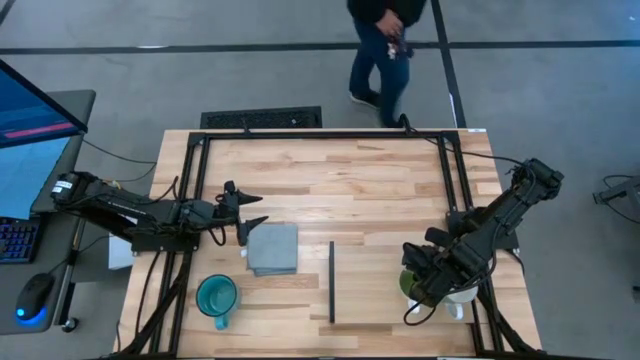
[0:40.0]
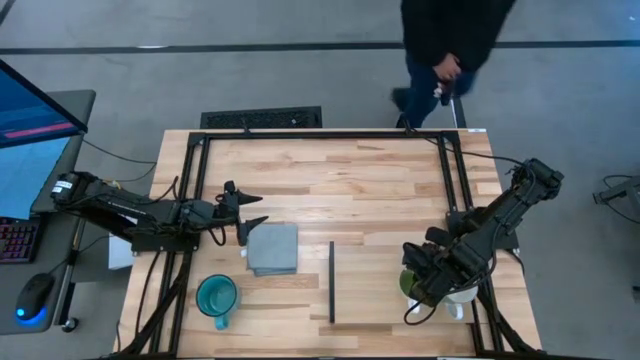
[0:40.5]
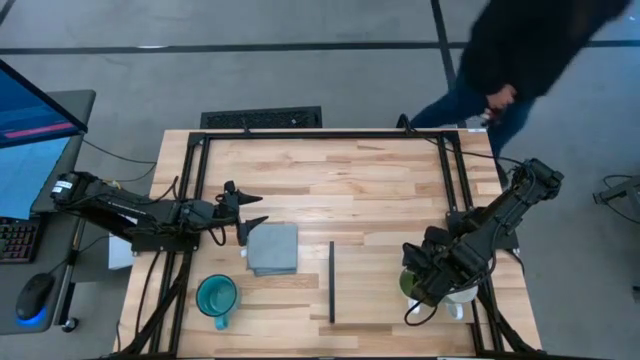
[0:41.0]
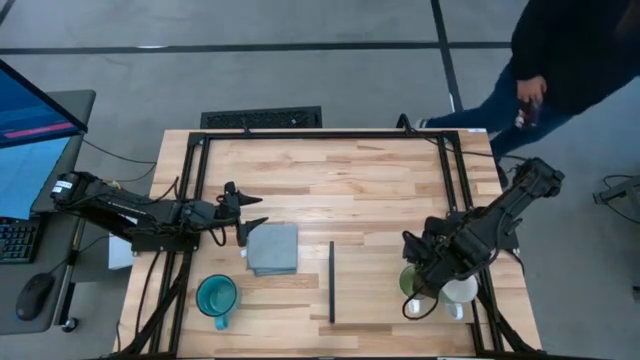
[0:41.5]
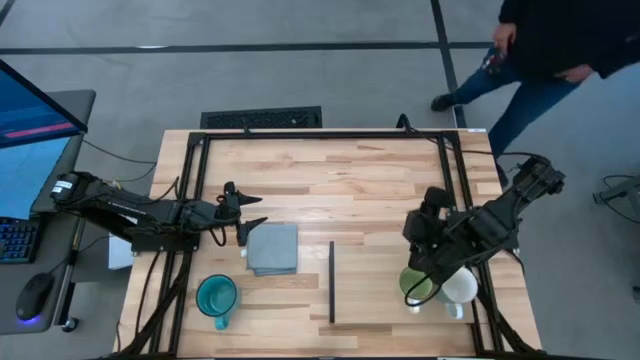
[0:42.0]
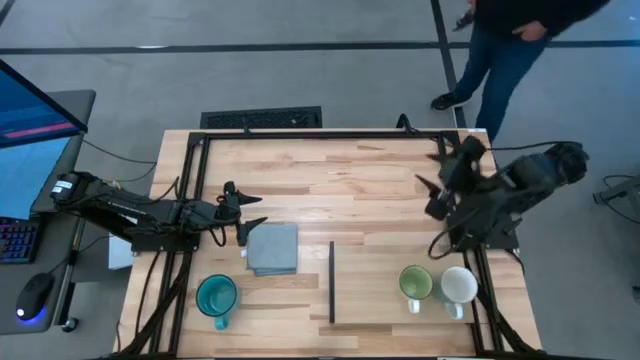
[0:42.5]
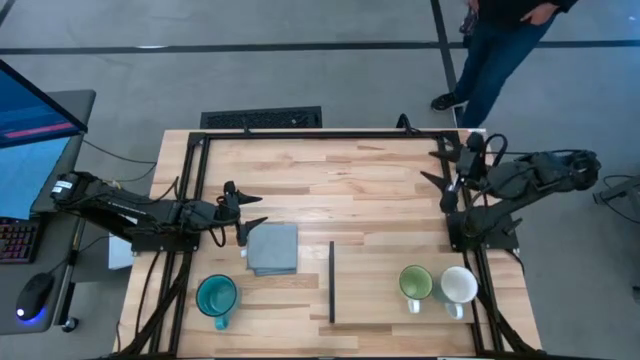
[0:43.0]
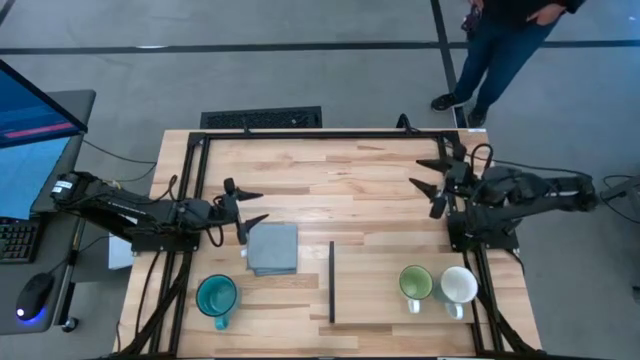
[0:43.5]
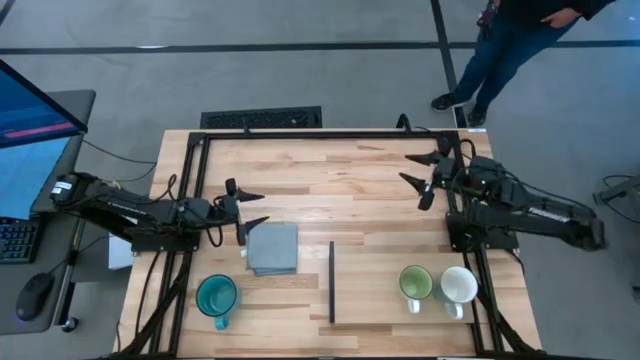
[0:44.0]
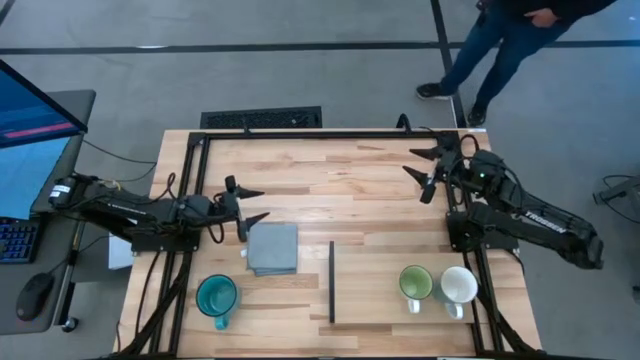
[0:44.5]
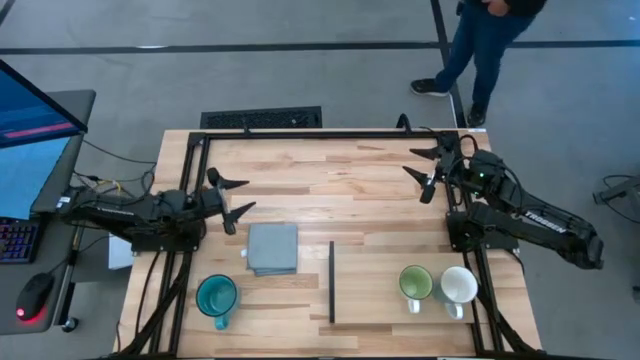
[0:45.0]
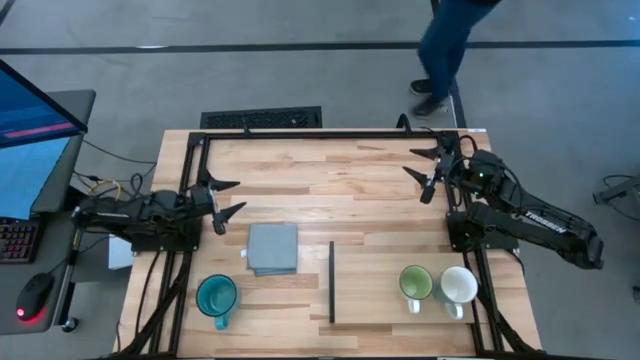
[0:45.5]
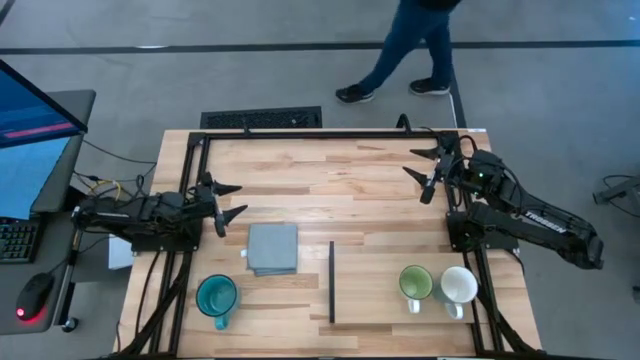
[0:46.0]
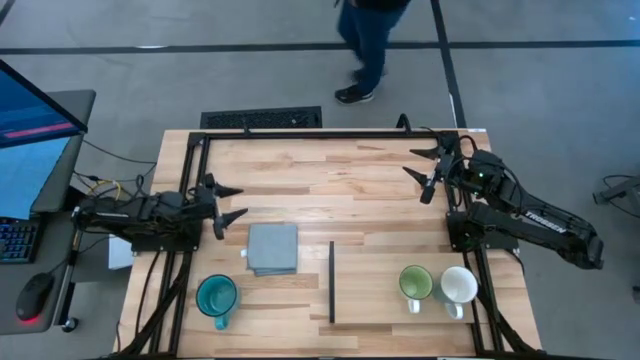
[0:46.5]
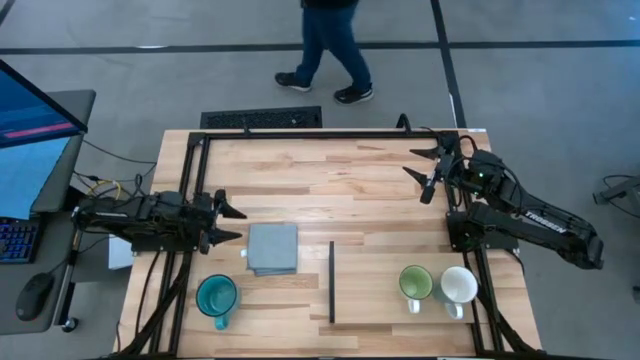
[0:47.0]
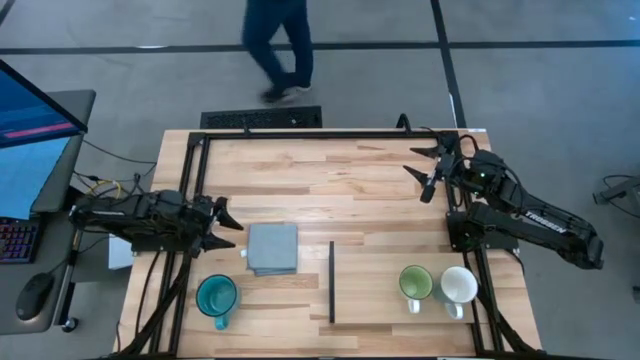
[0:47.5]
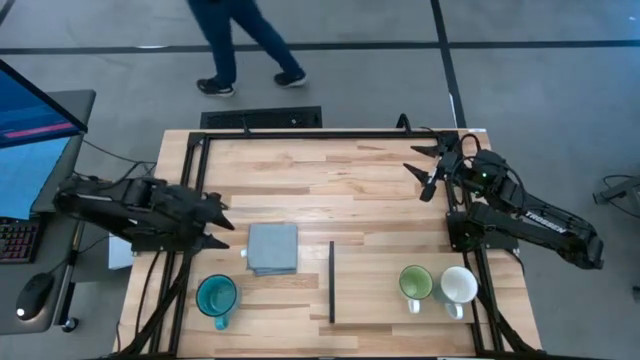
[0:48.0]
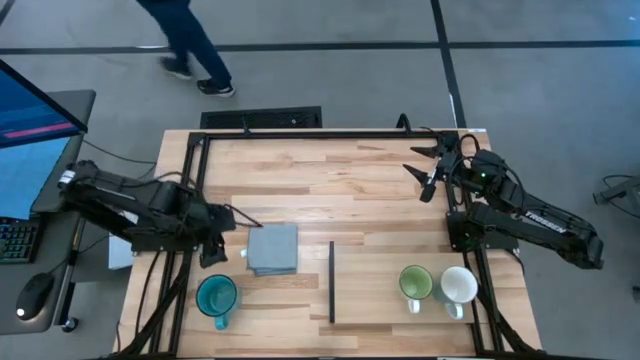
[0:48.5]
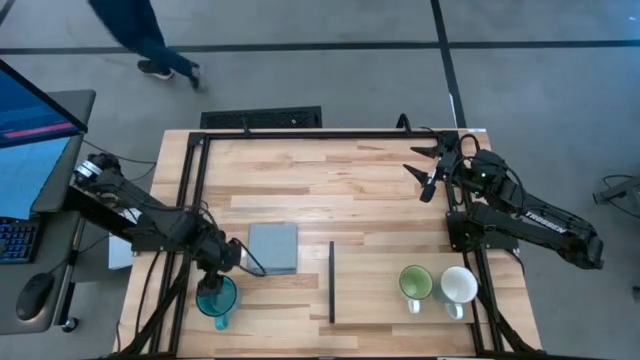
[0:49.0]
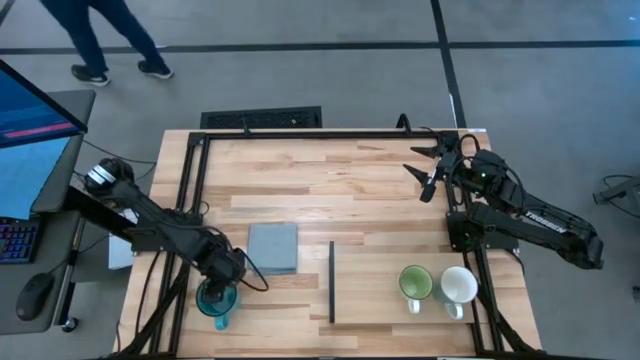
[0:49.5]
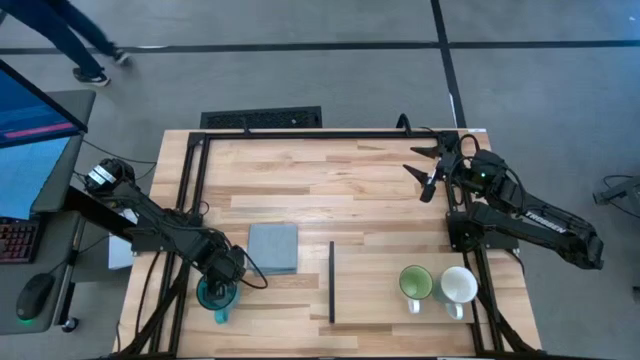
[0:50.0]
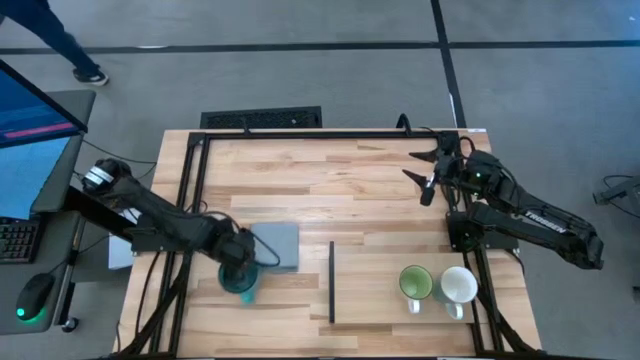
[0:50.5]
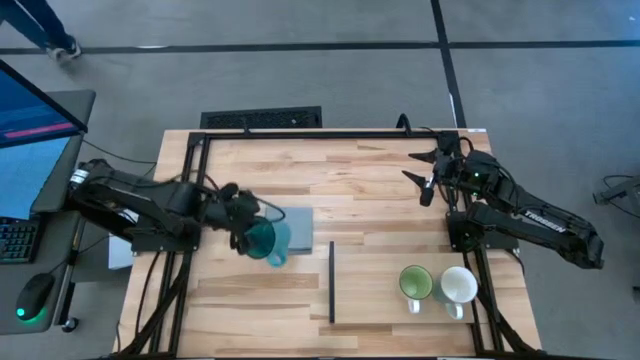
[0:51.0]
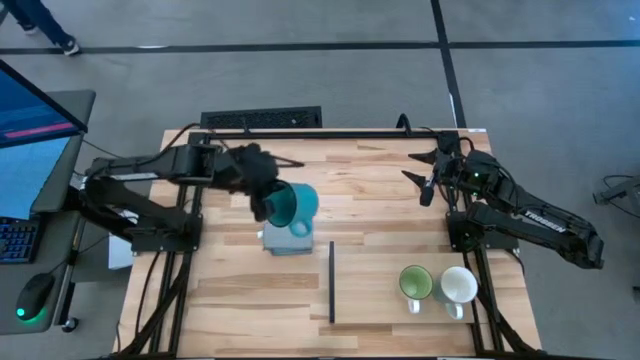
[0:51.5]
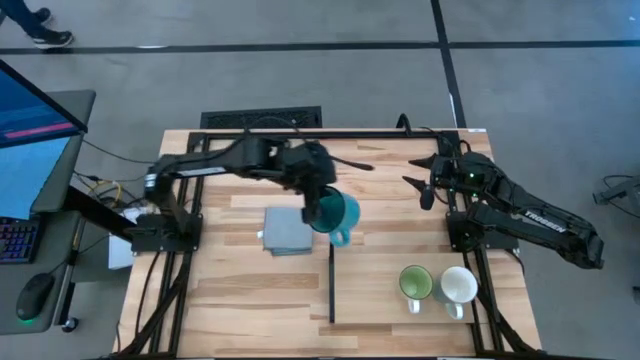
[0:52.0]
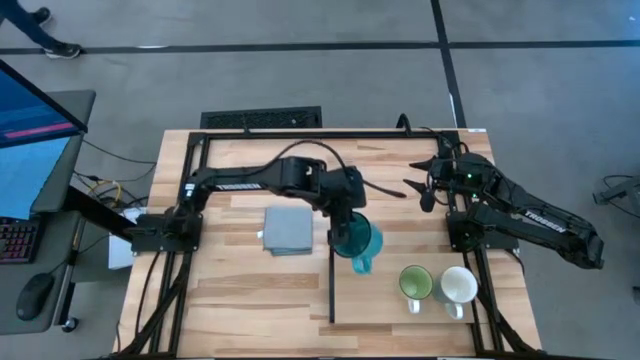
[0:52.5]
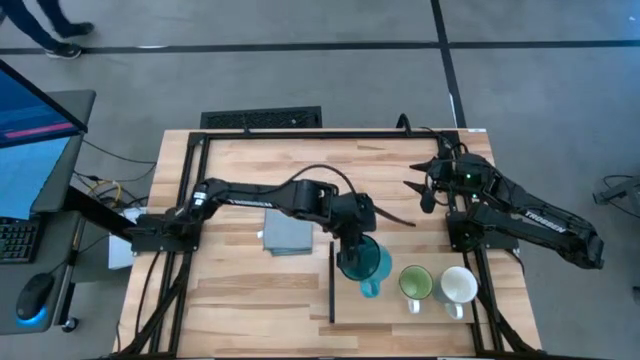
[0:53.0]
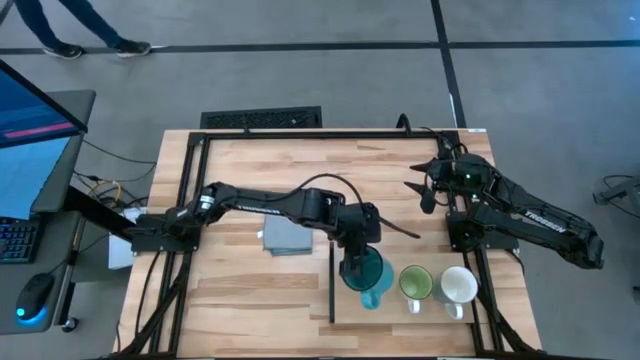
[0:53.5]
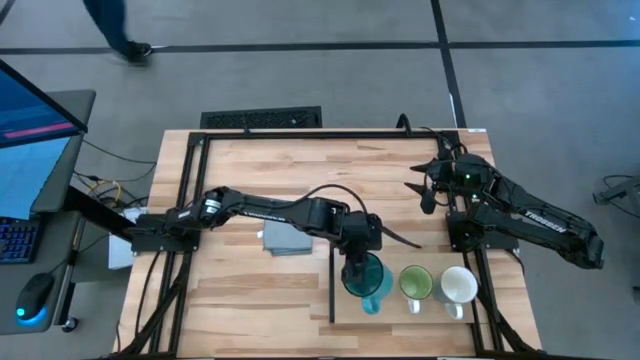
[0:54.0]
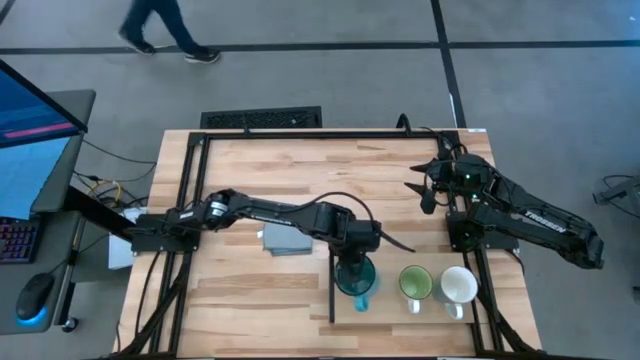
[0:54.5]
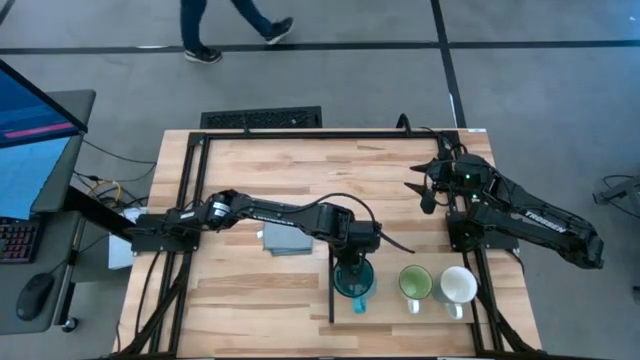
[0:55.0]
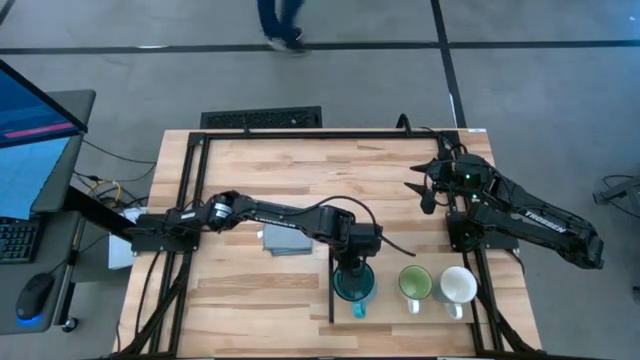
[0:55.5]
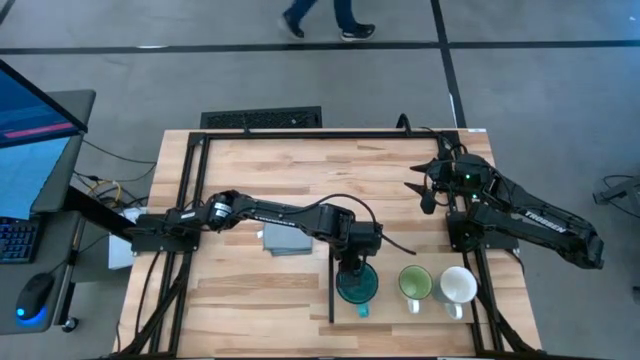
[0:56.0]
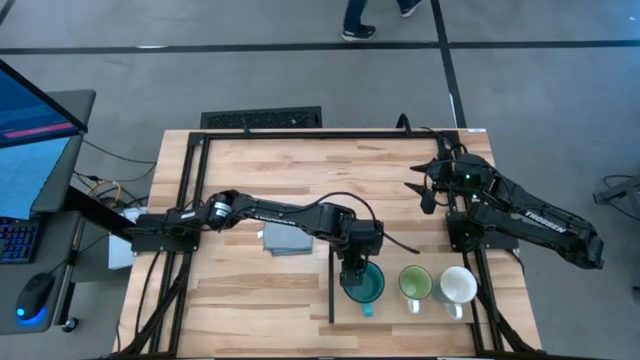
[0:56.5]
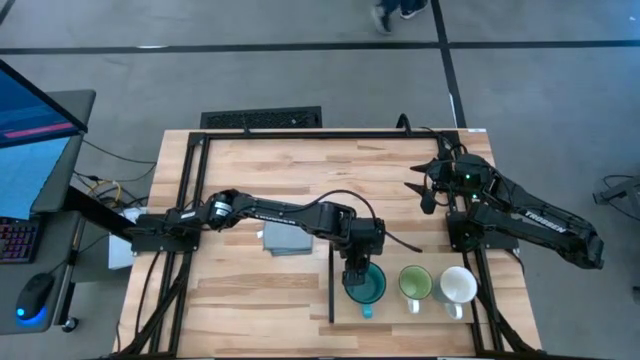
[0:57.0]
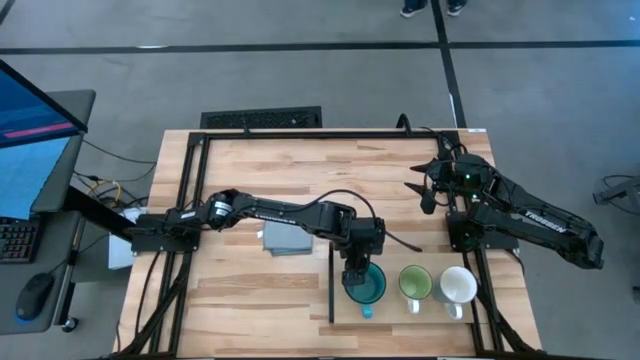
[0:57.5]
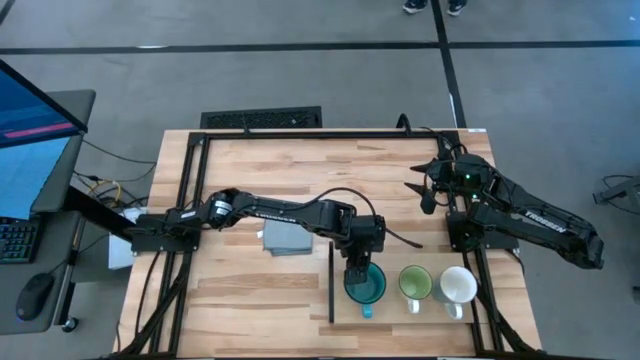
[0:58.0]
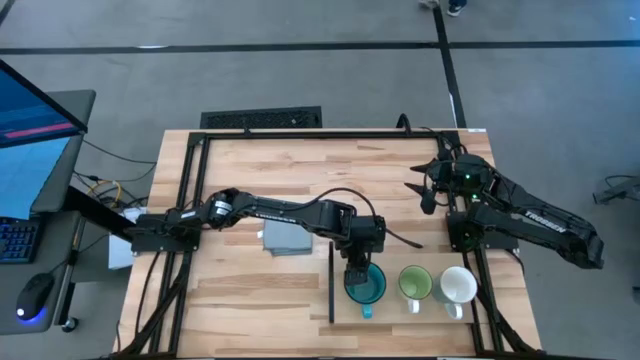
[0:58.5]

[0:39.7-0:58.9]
Task: Stack small to large cups/mugs on shelf
Put the blue-green mug on the shelf
